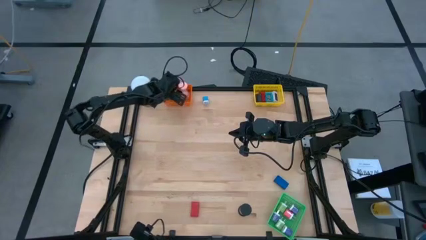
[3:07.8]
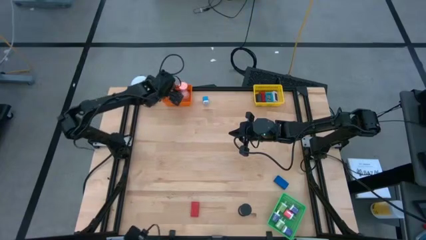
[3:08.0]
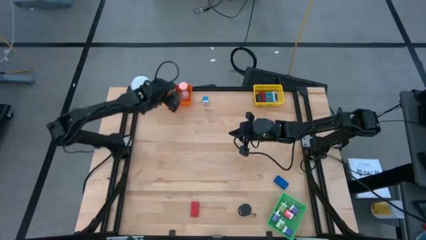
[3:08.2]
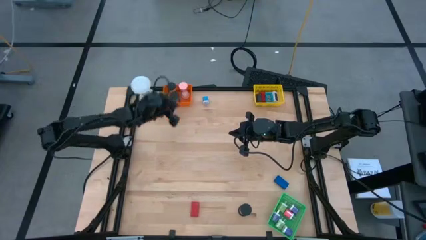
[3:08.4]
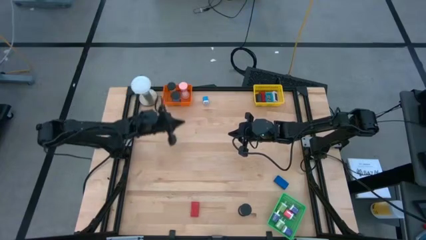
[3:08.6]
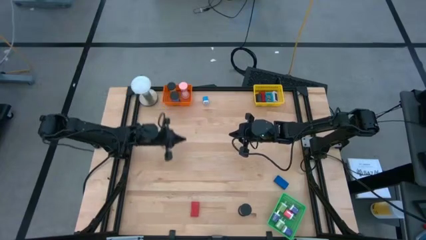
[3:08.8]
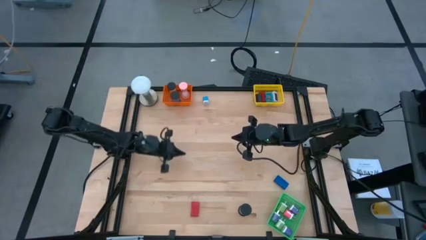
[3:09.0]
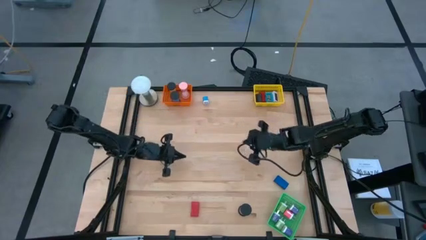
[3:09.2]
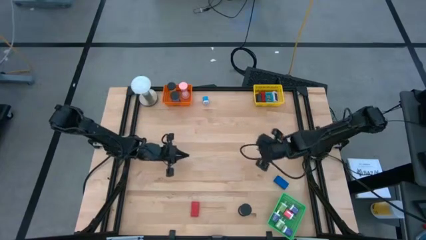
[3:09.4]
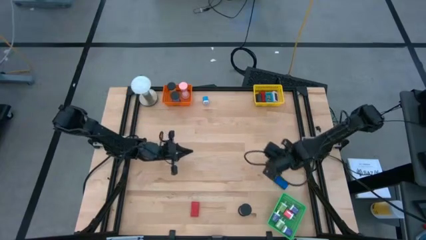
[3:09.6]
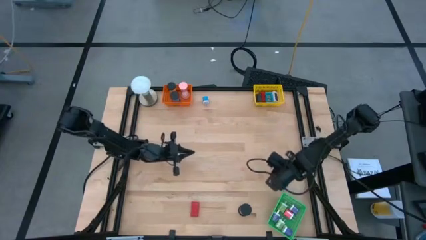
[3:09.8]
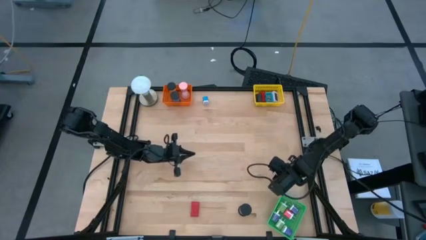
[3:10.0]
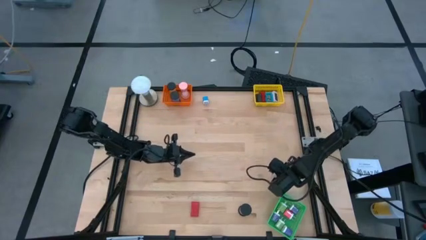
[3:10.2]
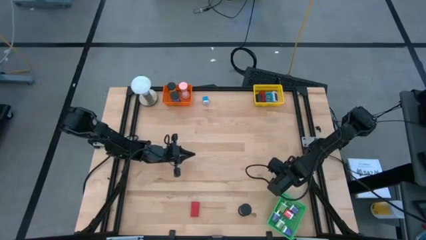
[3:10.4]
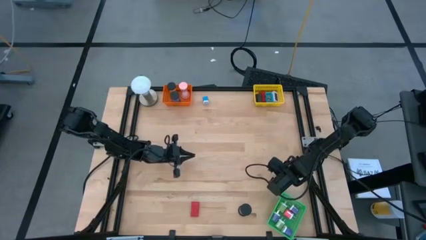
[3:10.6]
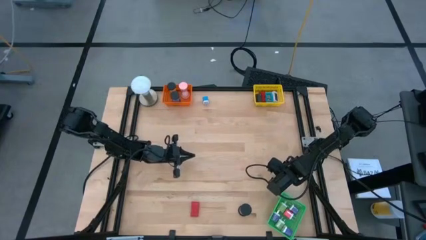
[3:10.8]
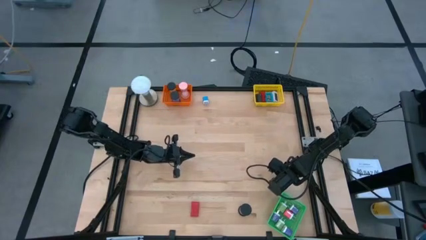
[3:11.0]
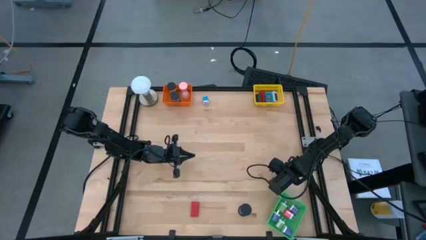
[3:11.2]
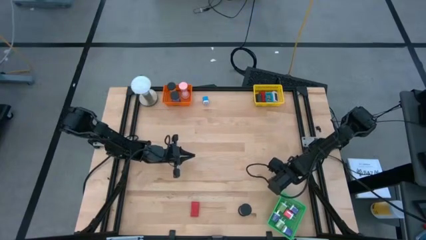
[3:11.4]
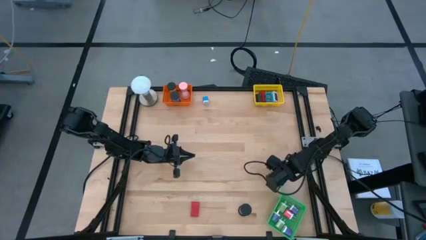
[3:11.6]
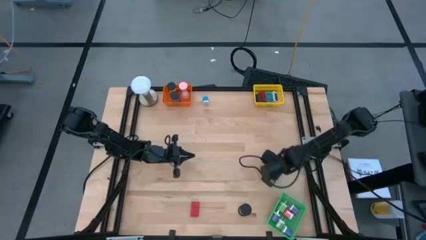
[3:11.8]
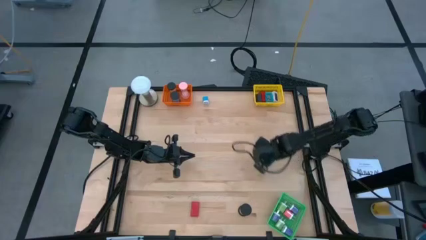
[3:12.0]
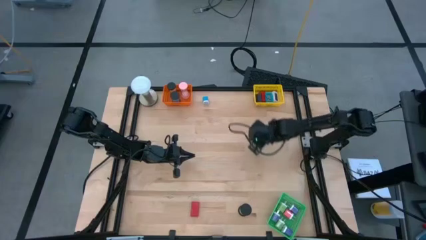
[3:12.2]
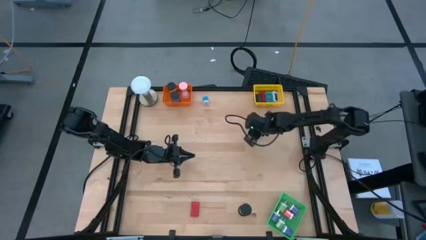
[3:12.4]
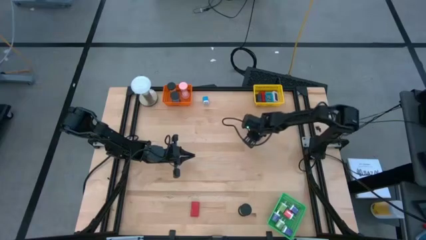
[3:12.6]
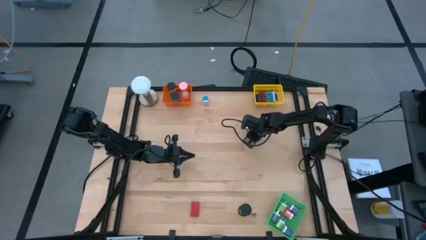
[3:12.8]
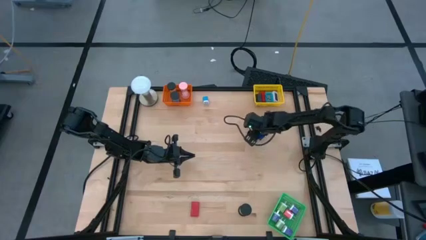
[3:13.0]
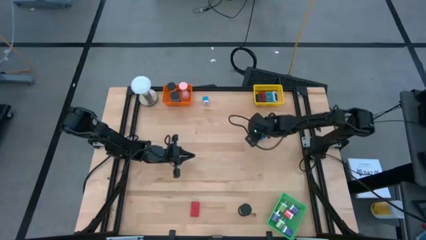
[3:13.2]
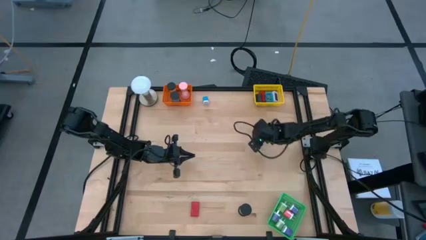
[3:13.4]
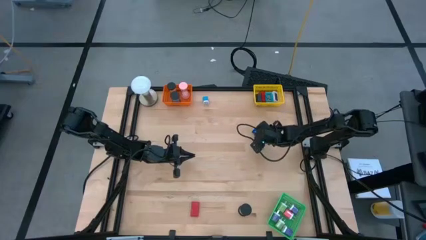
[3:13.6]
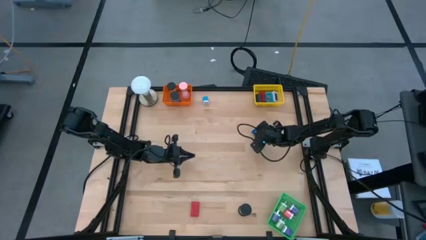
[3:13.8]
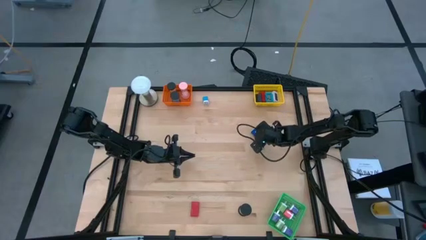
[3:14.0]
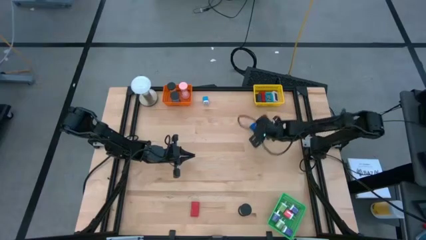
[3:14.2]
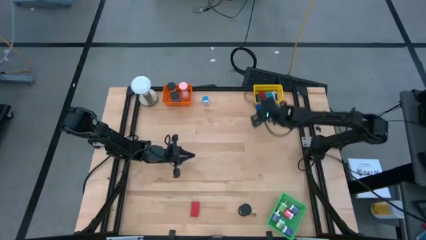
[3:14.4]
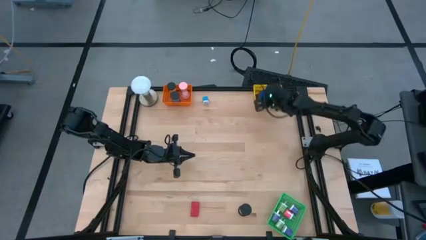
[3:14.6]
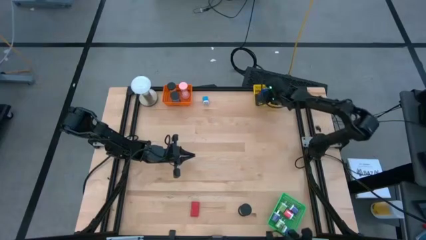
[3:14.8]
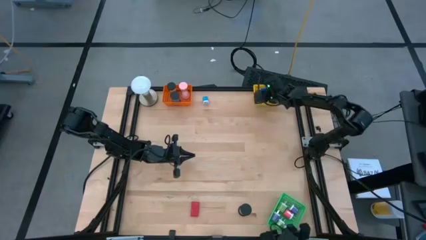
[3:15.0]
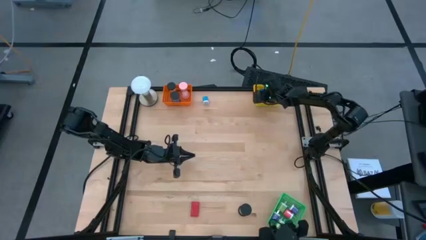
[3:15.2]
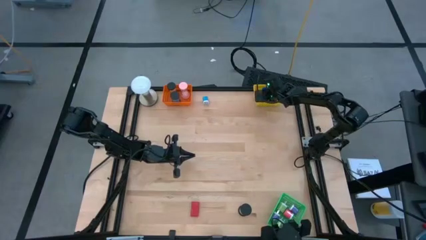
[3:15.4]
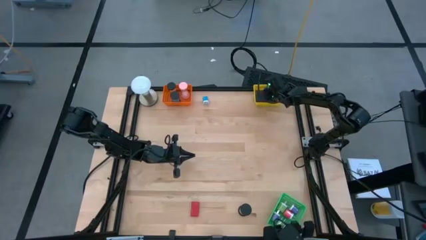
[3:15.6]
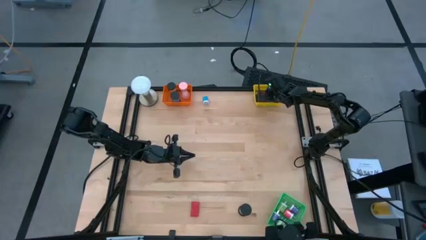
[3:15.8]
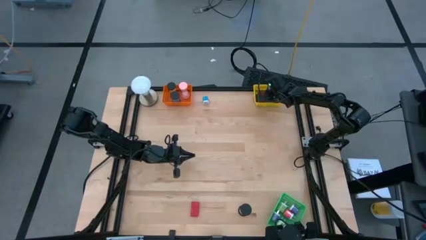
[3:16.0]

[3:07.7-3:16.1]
Task: Pick & Place Office items
Put the blue timer into the yellow basket

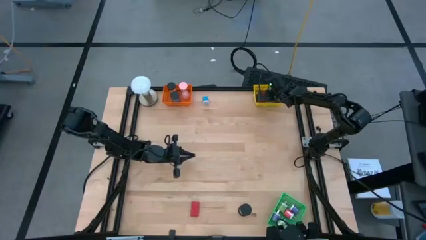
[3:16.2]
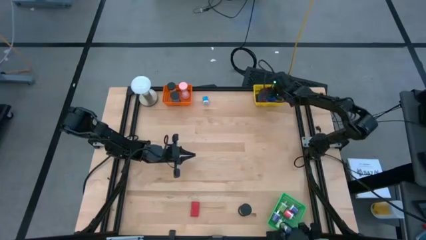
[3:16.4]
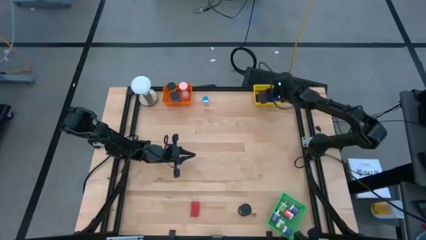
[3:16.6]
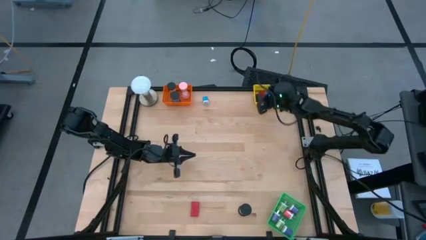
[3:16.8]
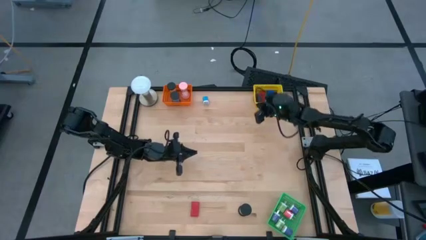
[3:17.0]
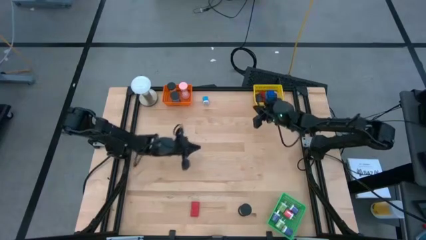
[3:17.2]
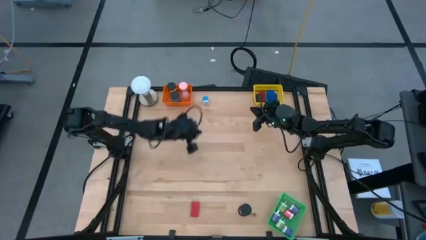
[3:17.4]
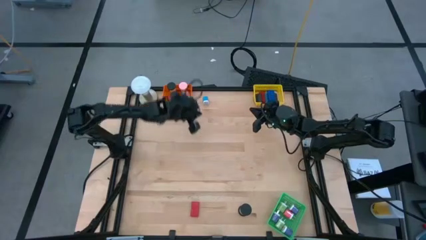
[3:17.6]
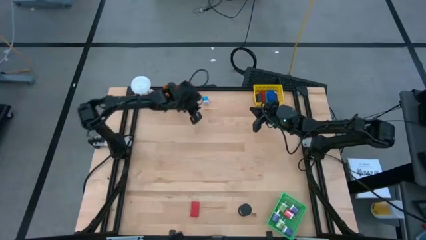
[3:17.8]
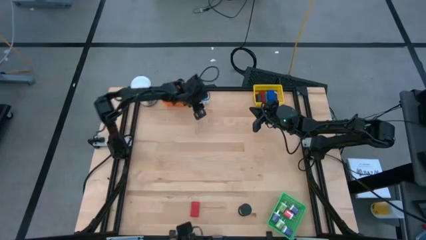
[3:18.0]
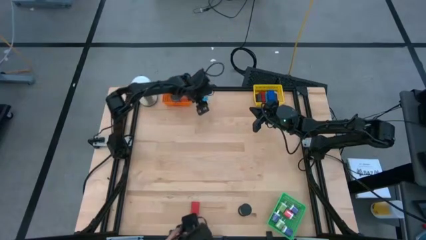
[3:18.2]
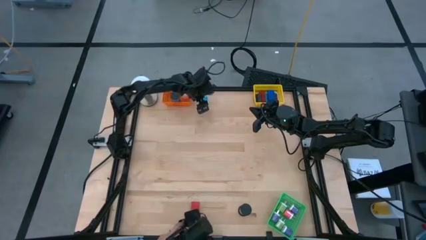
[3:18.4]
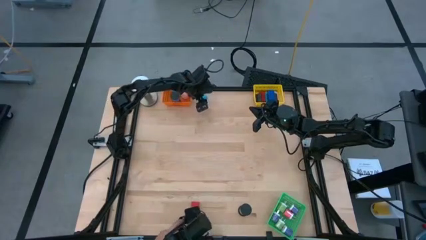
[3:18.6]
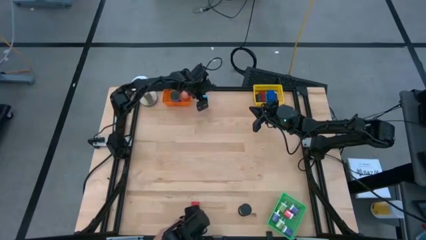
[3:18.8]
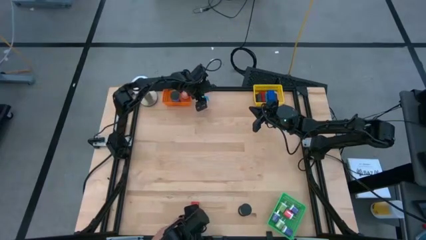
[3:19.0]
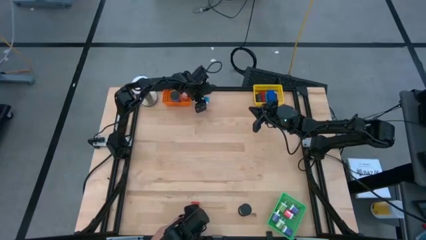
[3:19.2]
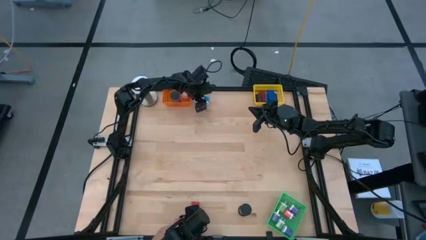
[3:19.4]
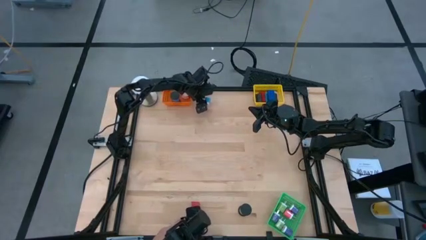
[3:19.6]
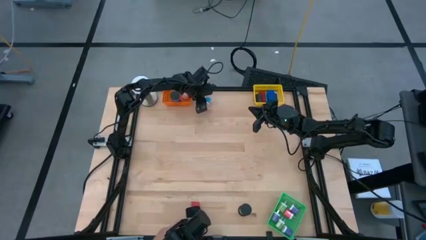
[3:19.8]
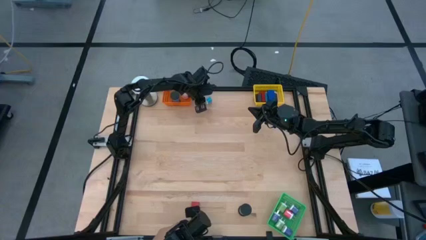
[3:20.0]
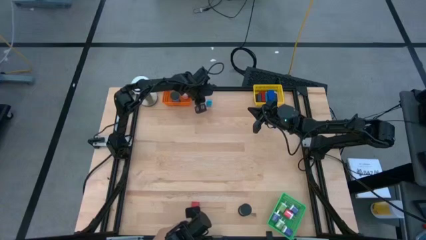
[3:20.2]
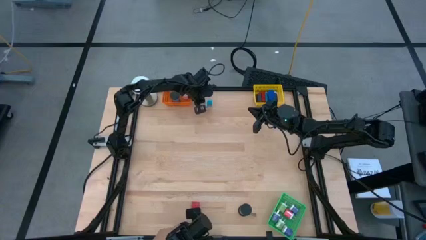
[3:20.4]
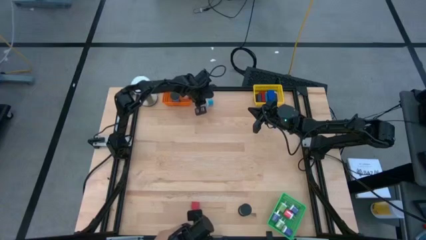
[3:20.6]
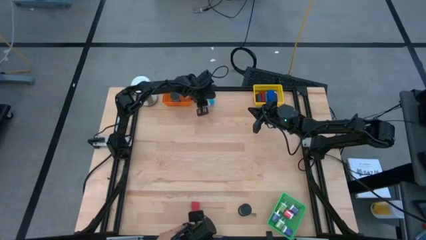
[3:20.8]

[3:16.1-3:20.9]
Put the blue charger adapter into the green basket

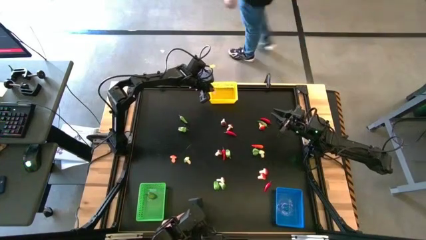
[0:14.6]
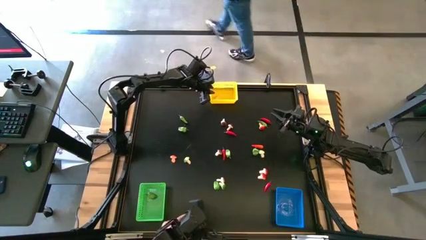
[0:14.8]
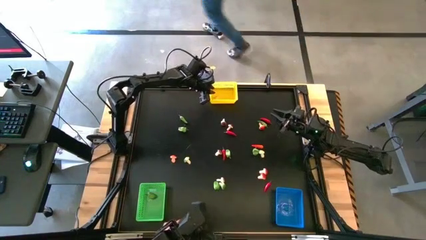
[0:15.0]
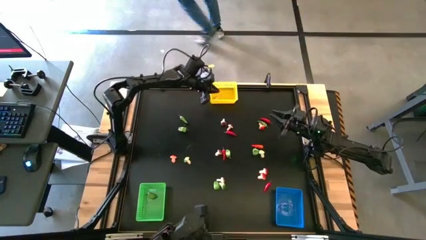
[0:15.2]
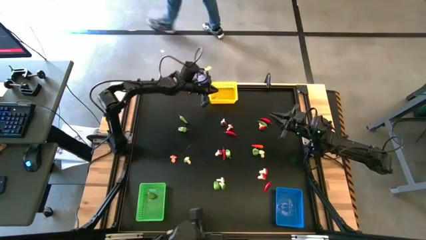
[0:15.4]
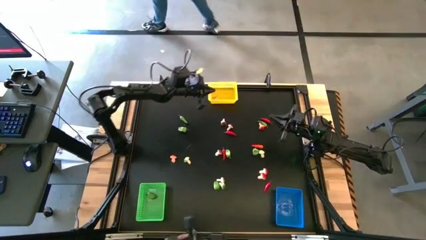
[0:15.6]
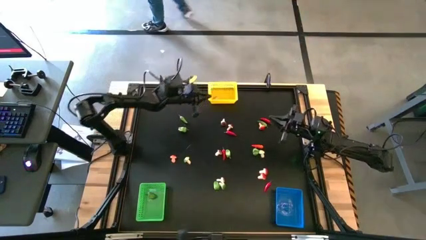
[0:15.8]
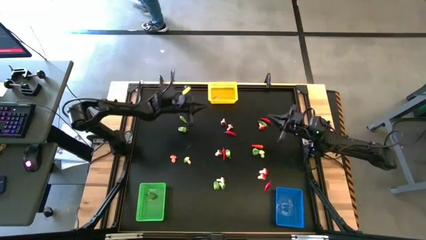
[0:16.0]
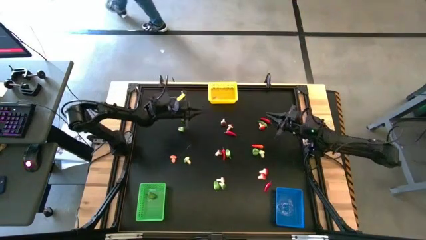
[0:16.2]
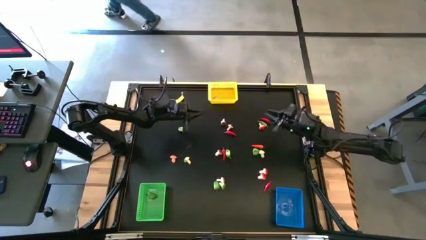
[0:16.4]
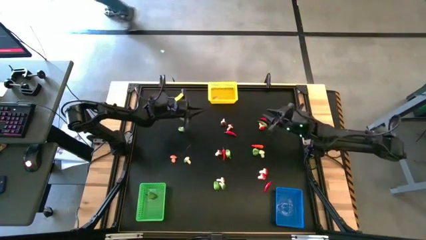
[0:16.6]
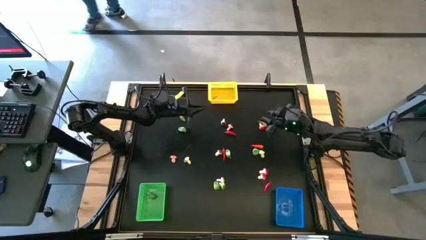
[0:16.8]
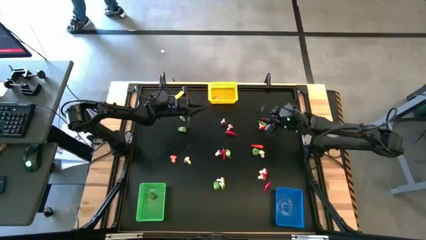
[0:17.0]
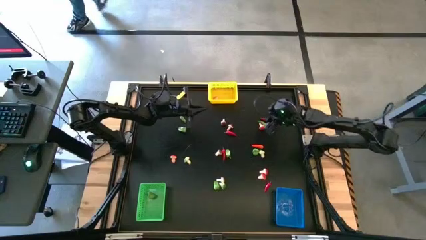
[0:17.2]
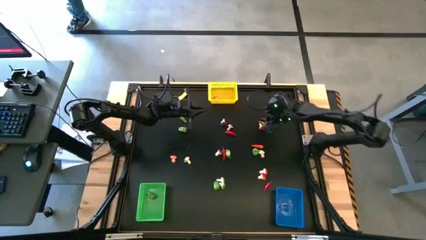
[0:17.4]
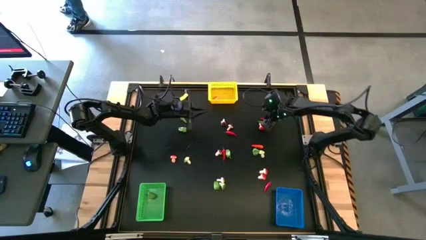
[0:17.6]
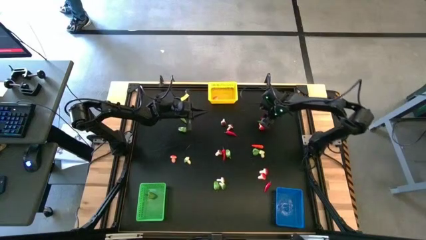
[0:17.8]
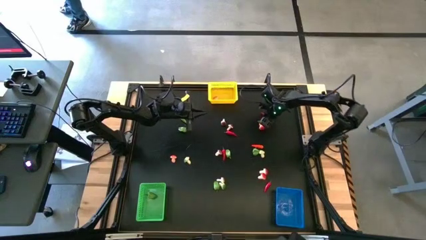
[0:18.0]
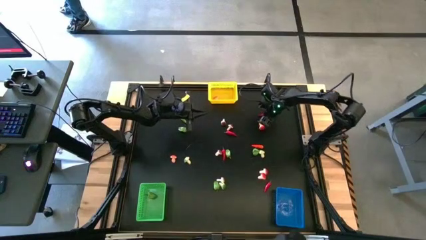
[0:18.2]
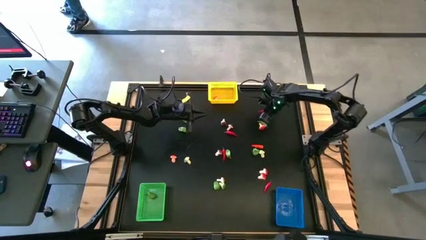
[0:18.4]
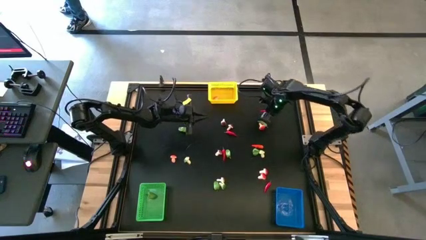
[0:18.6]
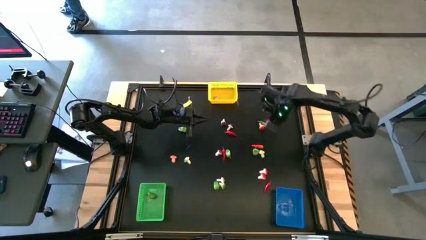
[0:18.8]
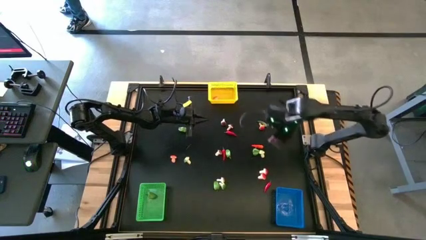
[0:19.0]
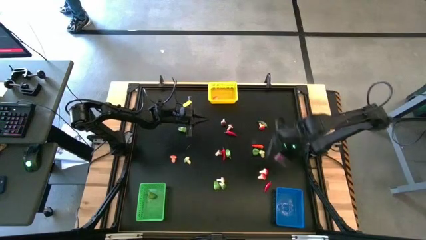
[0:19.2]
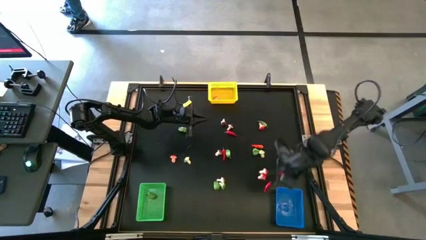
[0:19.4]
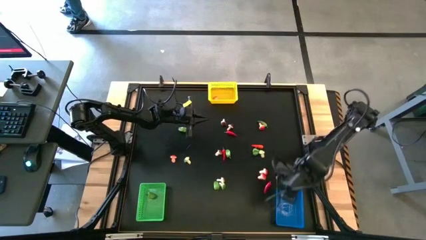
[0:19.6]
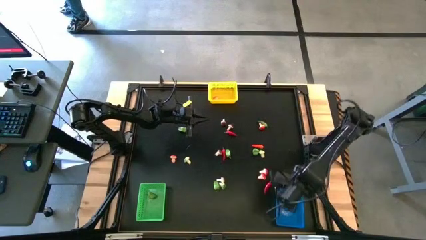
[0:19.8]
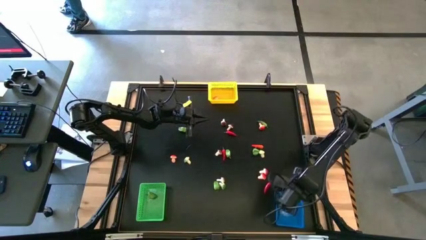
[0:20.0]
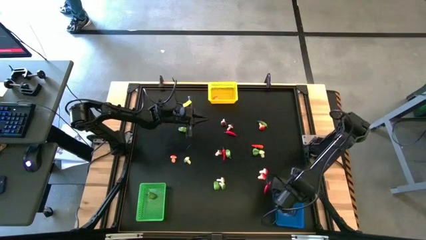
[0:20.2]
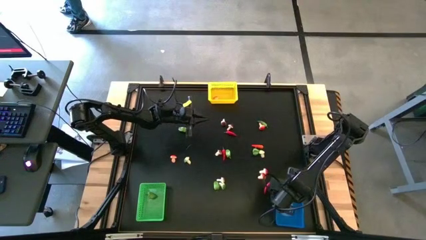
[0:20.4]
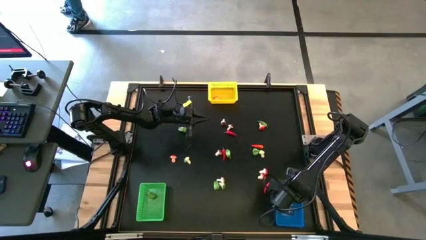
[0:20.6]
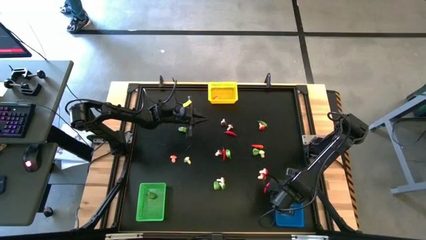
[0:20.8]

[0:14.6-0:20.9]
Task: Sort produce into baskets
Put the top right red chili into the blue bin
